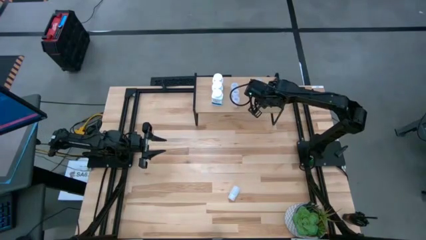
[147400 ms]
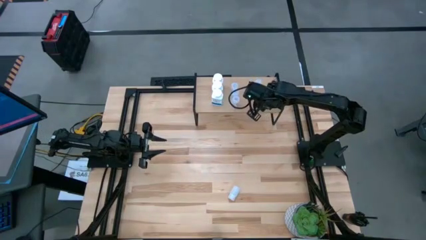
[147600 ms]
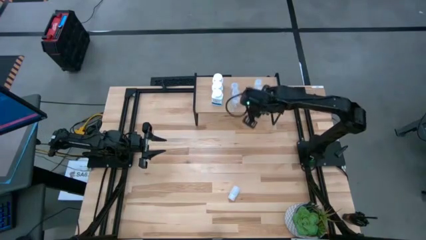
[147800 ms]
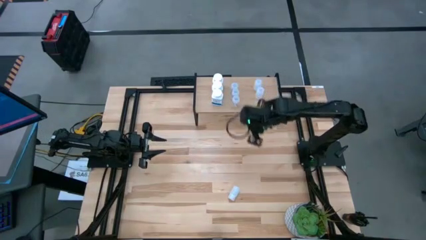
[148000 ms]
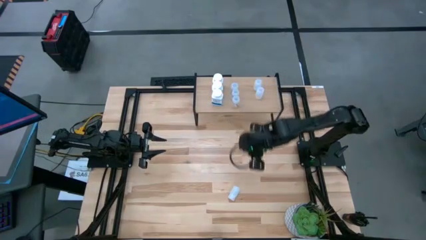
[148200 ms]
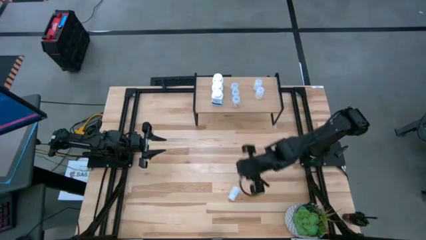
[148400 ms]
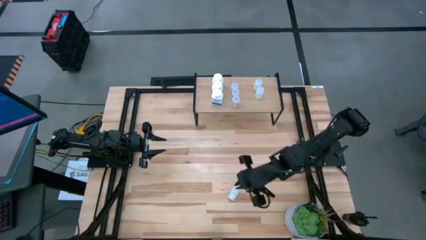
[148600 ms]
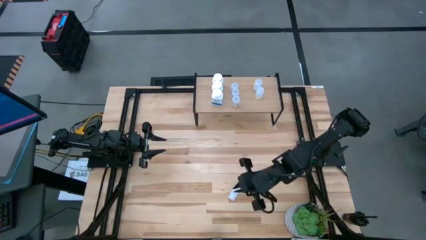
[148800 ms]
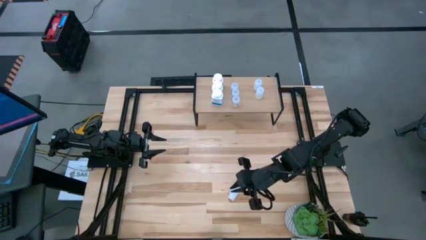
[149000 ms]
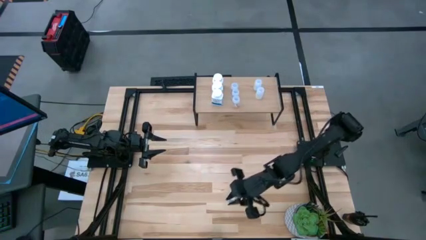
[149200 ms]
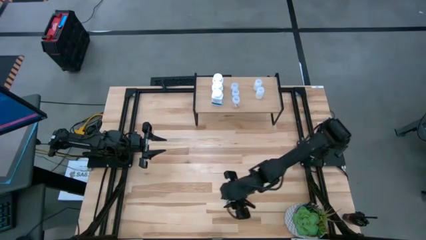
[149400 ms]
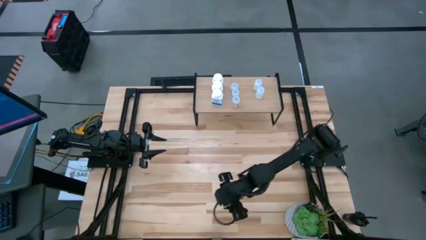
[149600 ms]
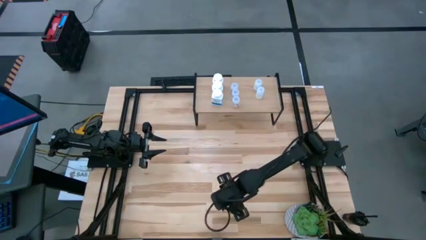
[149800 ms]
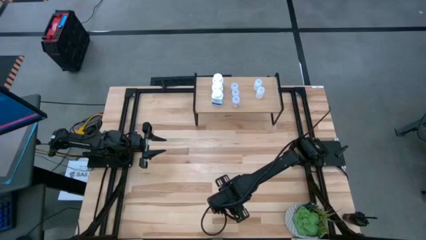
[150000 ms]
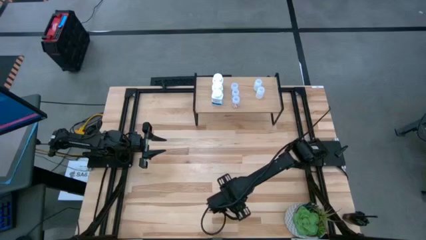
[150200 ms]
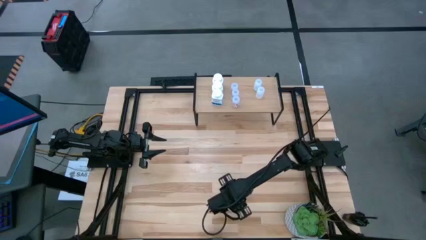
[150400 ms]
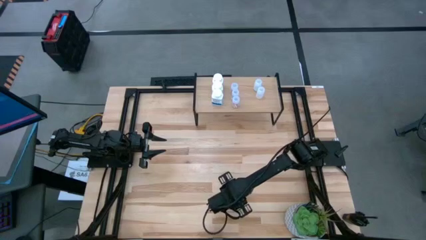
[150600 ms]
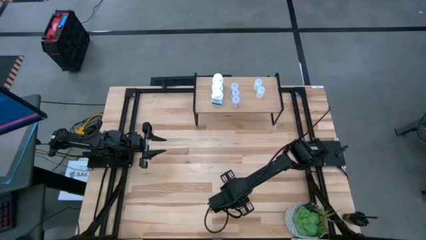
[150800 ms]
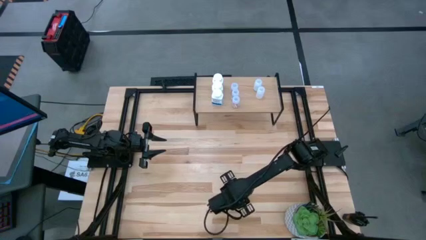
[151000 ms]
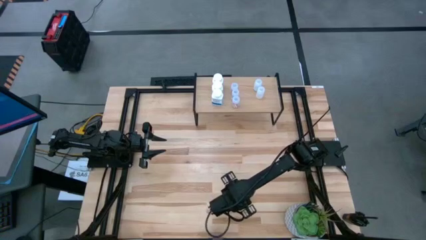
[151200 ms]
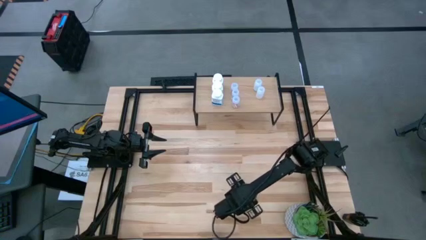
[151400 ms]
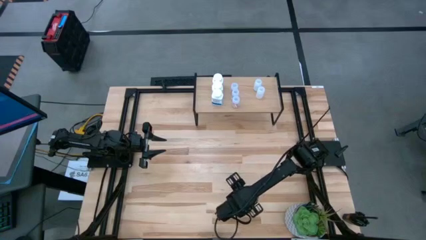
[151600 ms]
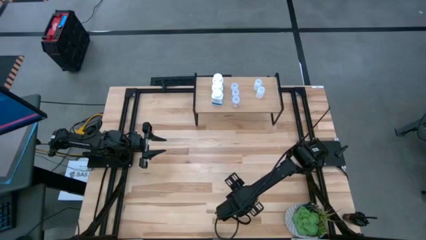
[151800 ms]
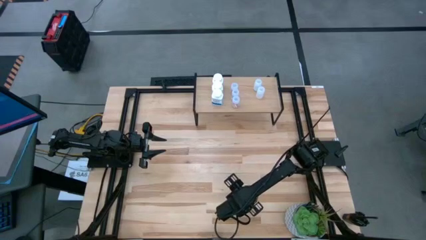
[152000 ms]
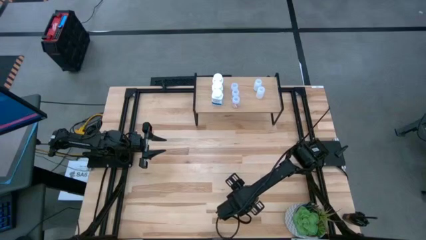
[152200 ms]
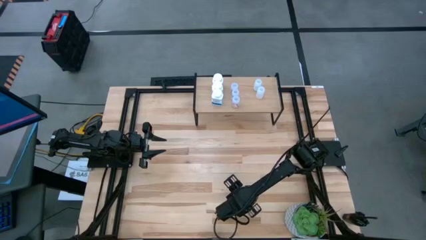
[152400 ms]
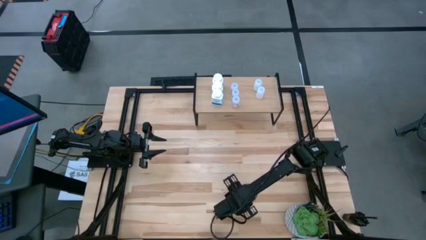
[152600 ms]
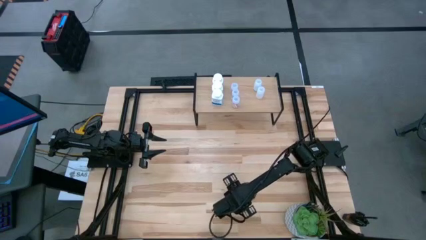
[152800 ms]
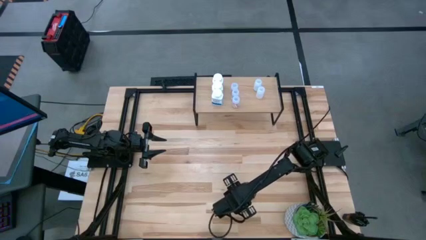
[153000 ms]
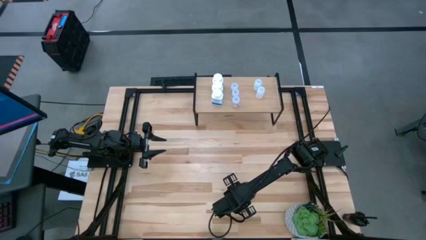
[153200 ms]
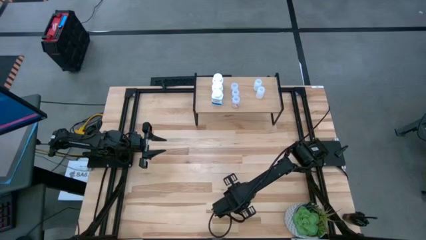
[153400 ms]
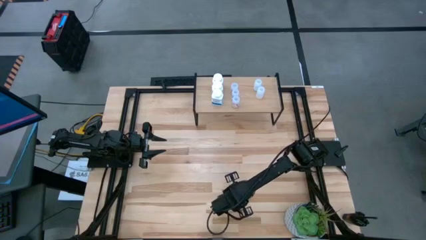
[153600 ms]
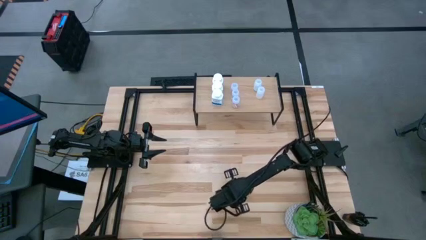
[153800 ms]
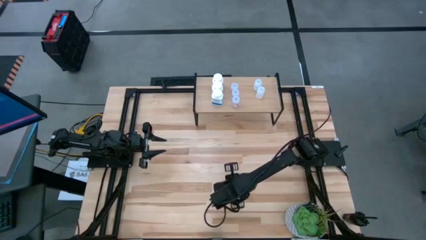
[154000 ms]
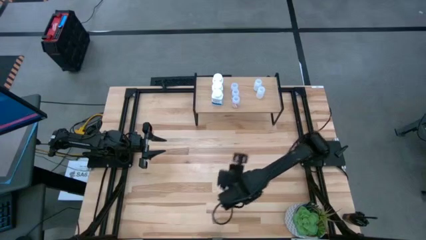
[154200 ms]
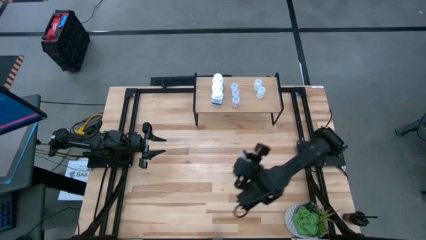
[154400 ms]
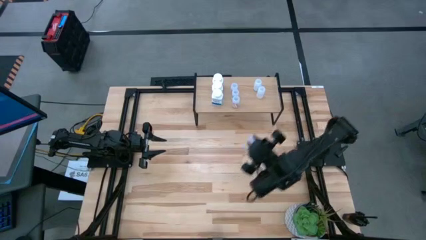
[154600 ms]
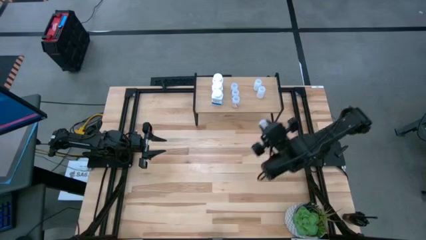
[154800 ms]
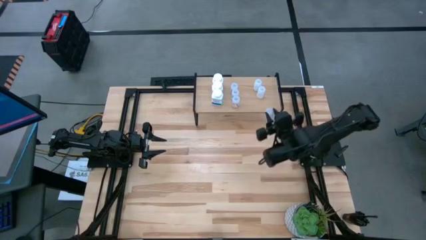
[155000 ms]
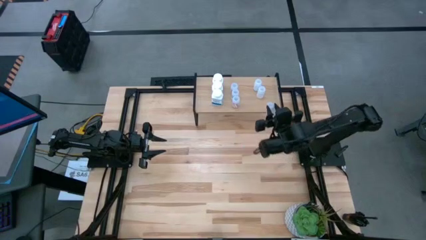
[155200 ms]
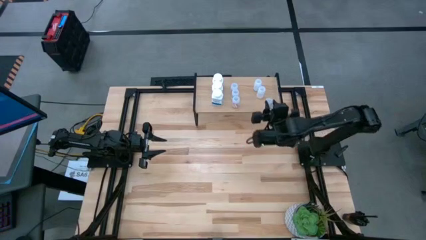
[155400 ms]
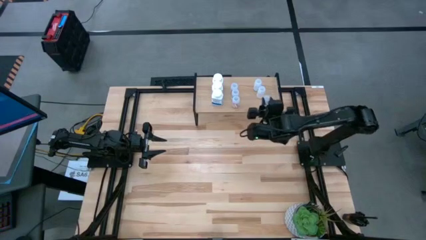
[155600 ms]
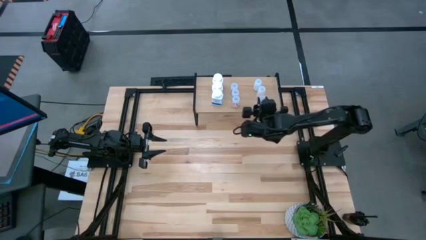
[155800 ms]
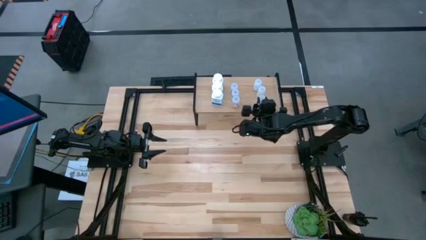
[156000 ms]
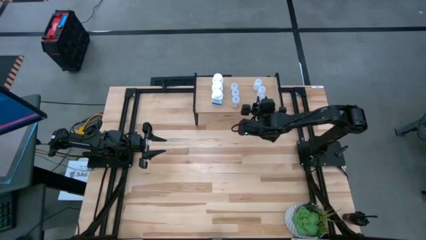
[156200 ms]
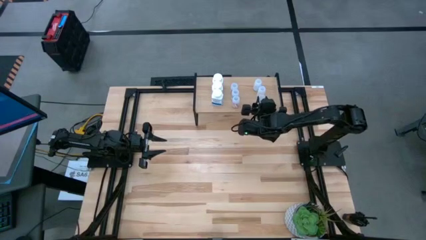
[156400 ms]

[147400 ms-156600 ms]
Task: Pick and place medicine bottles onto shelf by color
Put the white pill bottle on the shelf aligned with the other white pill bottle

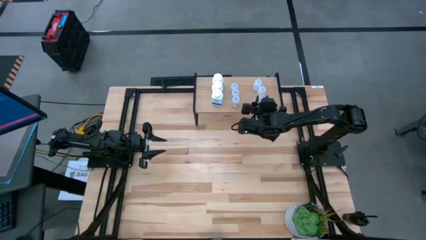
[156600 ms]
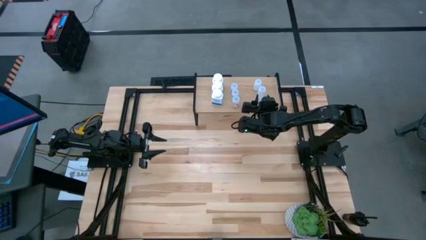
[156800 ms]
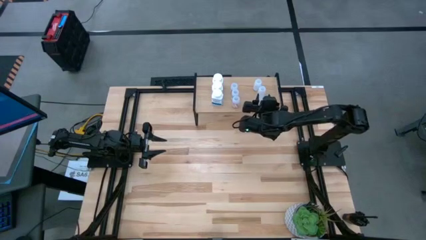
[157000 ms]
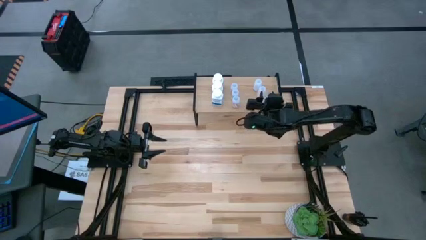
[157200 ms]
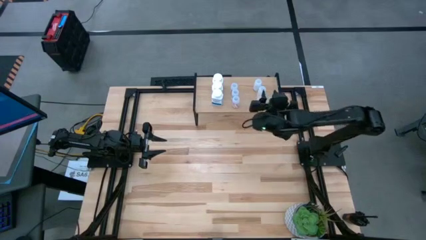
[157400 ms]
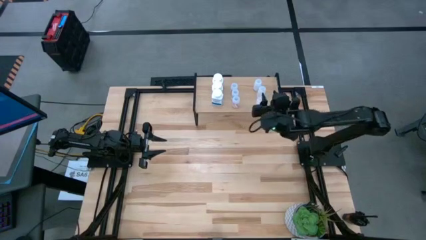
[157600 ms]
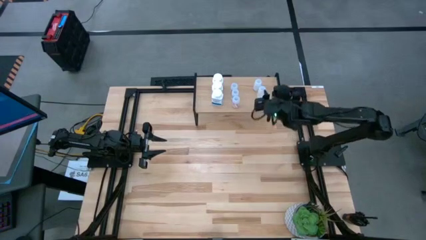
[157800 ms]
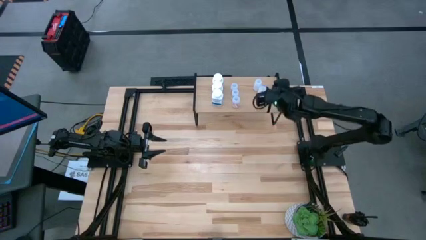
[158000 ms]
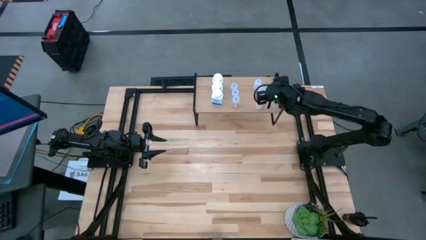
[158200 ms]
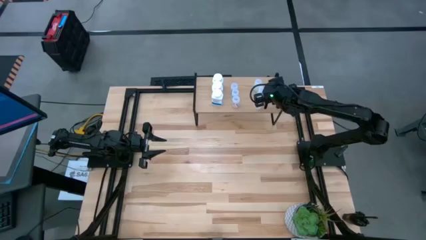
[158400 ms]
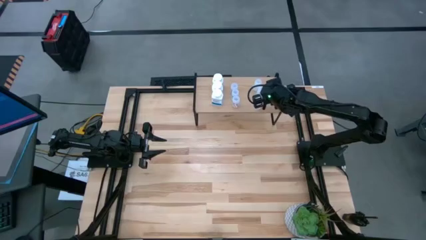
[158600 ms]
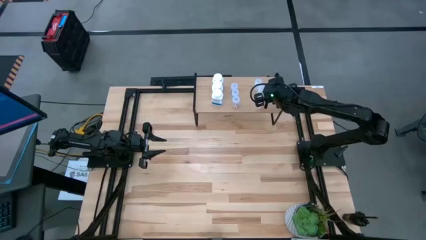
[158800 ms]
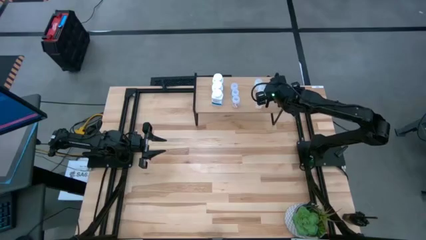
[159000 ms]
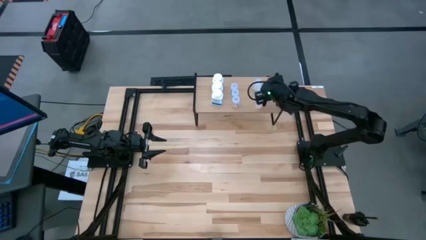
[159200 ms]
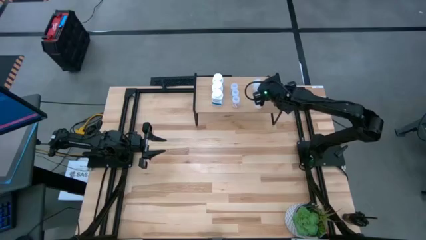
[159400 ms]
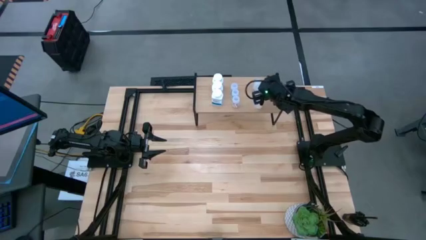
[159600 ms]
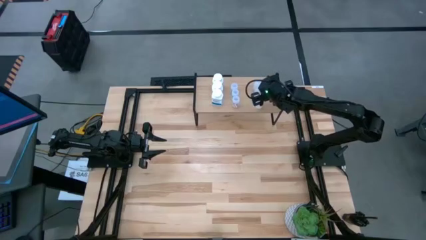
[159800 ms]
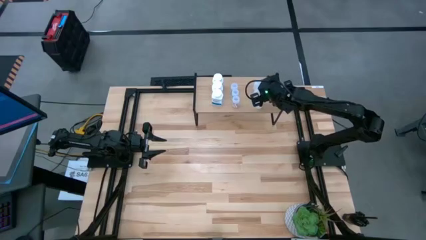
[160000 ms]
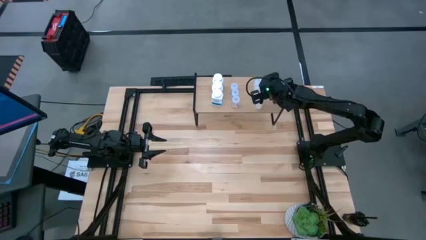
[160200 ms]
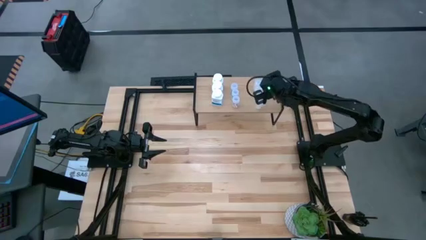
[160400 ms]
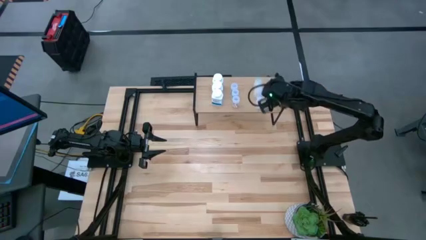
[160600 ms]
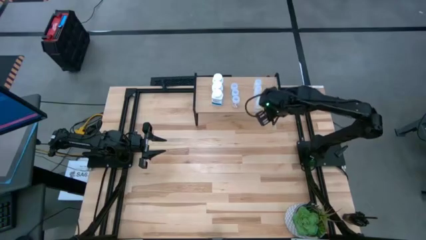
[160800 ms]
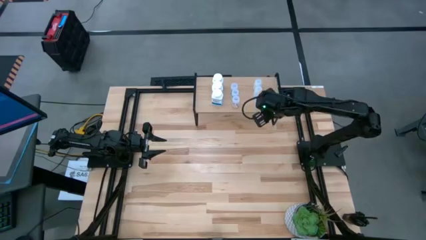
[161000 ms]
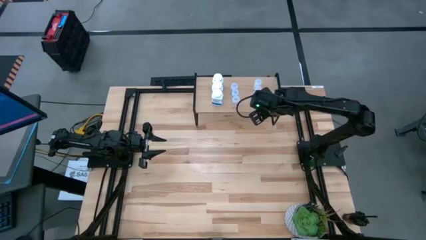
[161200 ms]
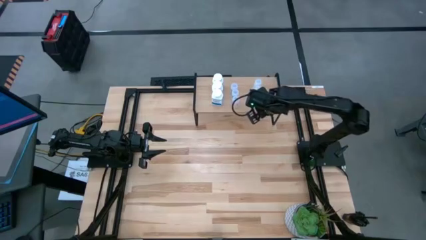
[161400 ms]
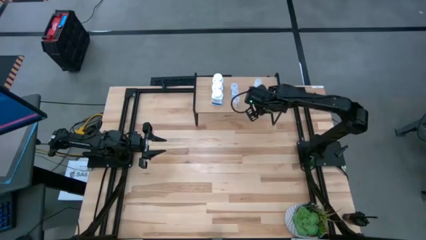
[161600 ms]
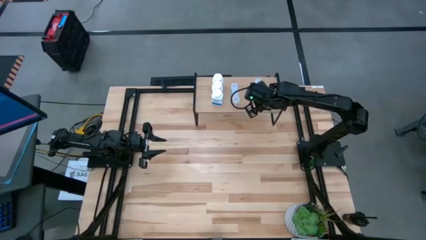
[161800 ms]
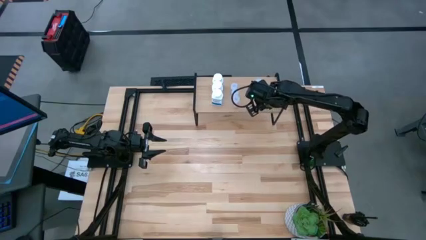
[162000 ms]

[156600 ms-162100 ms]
Adjust the white pill bottles on the shelf
